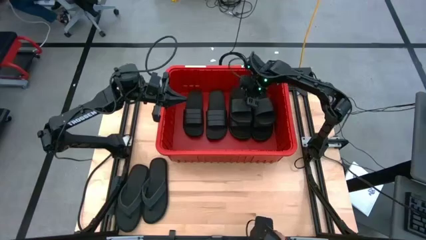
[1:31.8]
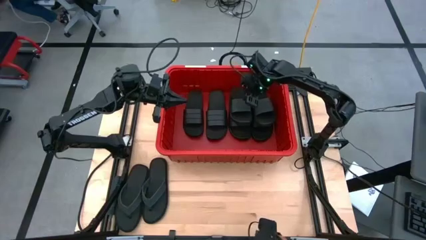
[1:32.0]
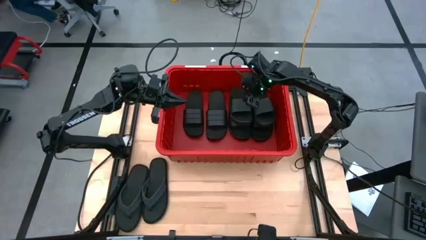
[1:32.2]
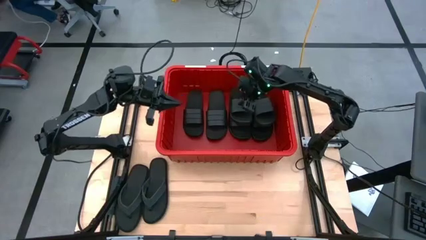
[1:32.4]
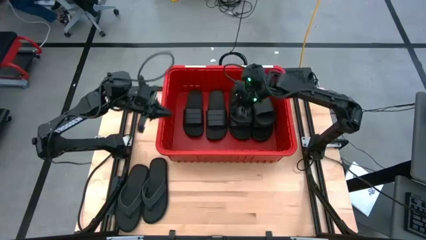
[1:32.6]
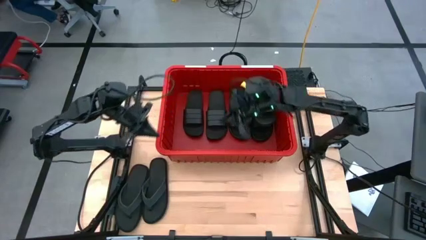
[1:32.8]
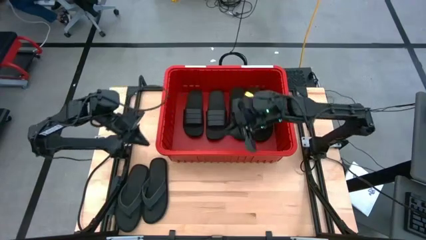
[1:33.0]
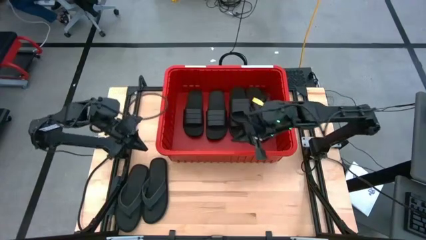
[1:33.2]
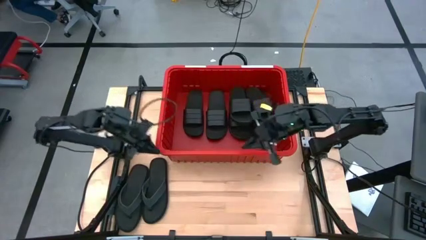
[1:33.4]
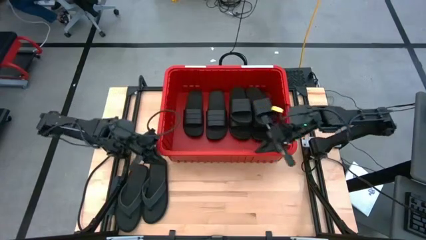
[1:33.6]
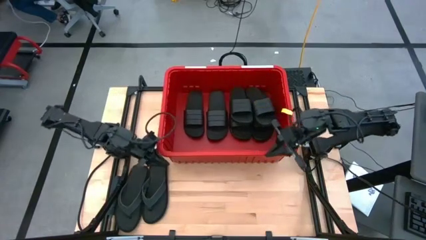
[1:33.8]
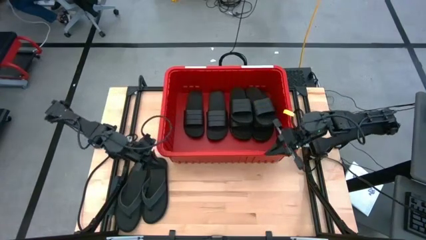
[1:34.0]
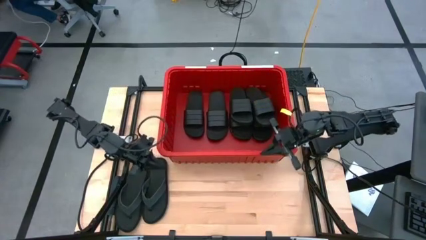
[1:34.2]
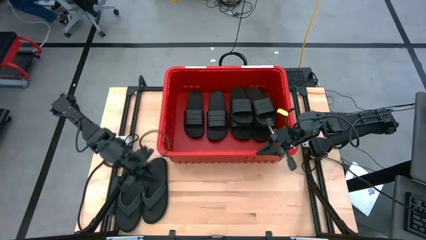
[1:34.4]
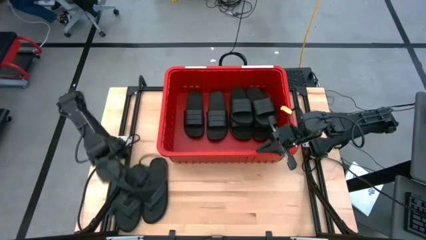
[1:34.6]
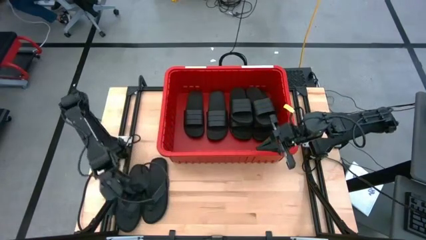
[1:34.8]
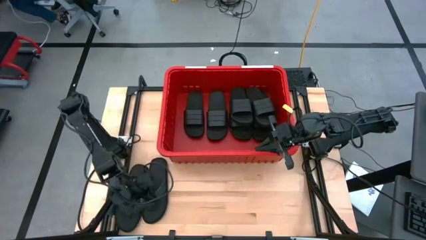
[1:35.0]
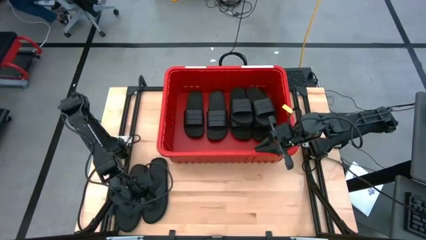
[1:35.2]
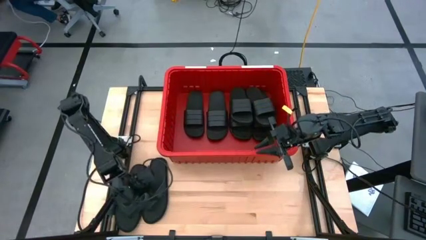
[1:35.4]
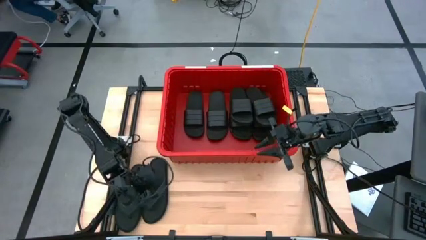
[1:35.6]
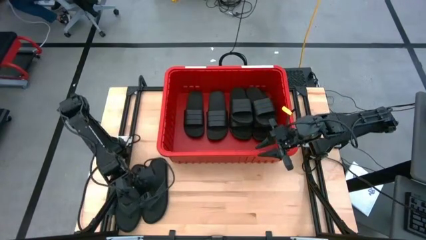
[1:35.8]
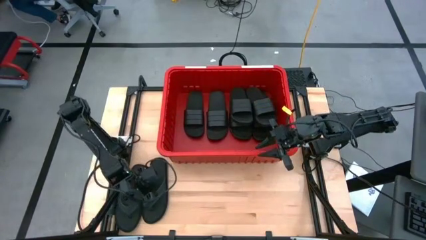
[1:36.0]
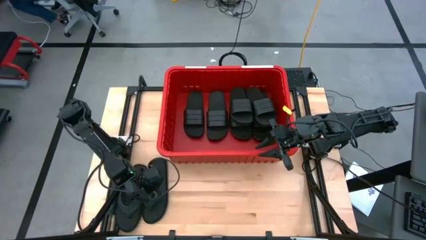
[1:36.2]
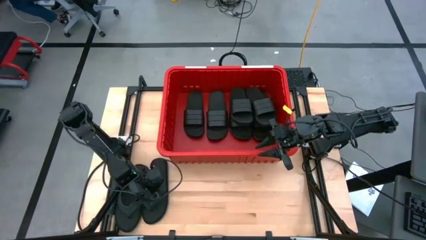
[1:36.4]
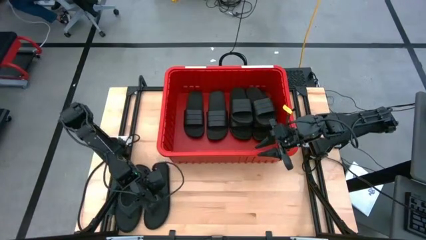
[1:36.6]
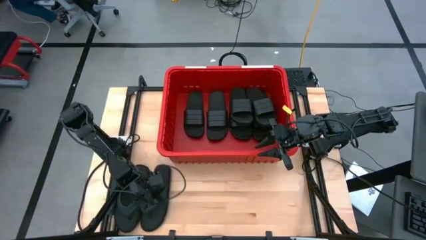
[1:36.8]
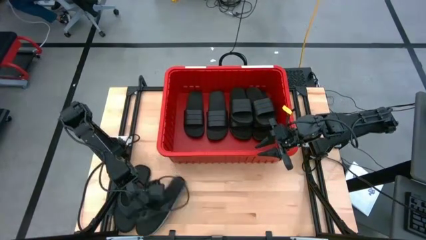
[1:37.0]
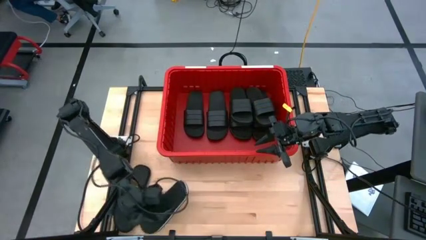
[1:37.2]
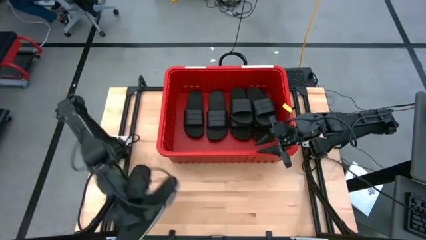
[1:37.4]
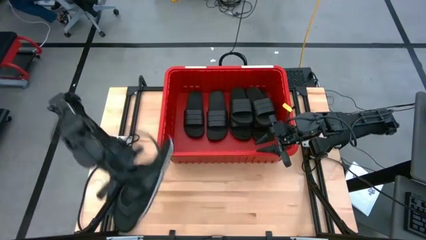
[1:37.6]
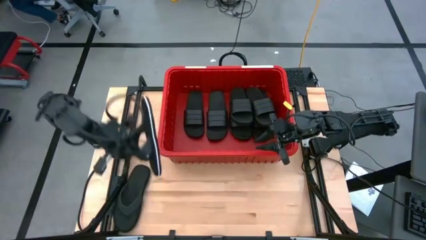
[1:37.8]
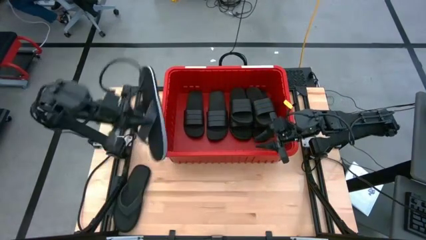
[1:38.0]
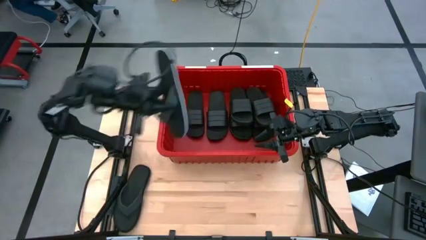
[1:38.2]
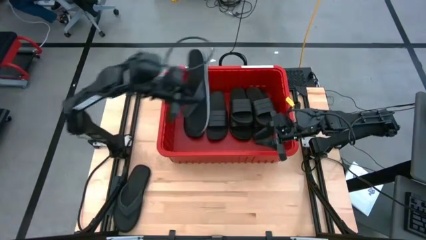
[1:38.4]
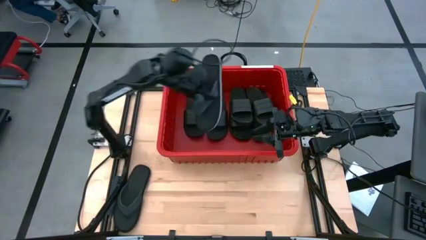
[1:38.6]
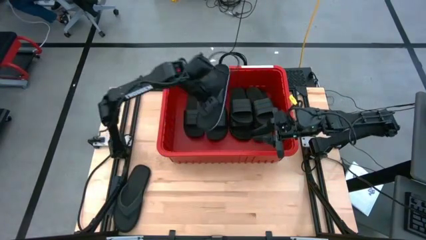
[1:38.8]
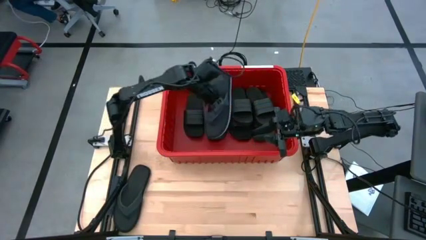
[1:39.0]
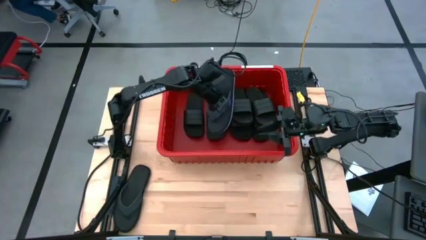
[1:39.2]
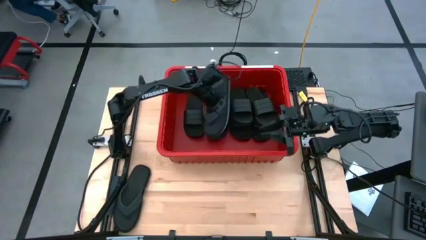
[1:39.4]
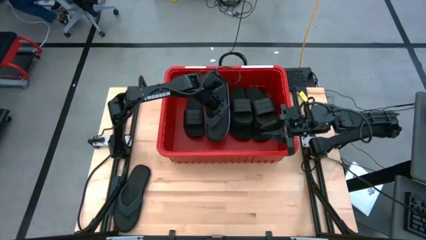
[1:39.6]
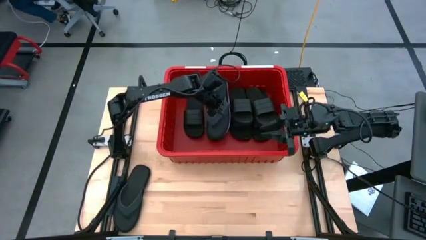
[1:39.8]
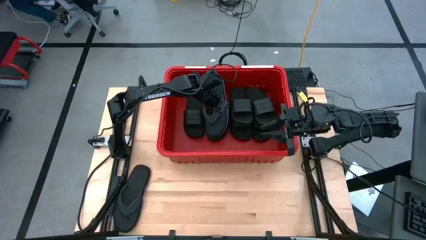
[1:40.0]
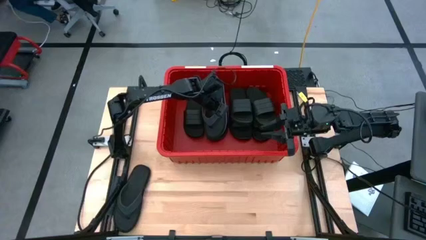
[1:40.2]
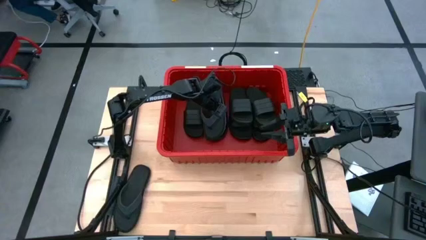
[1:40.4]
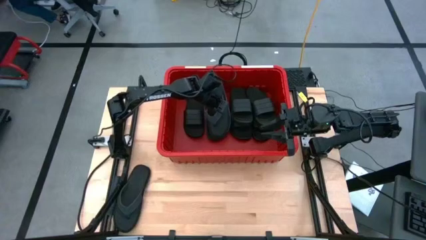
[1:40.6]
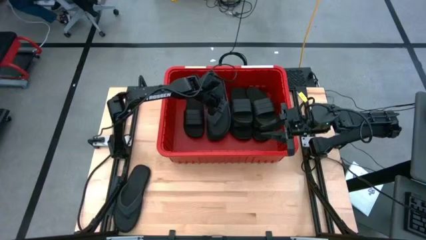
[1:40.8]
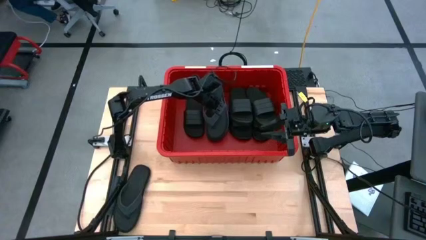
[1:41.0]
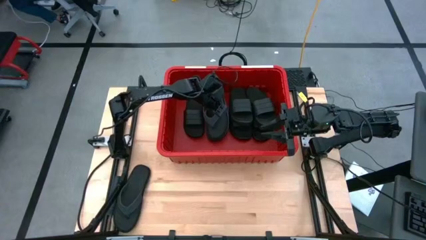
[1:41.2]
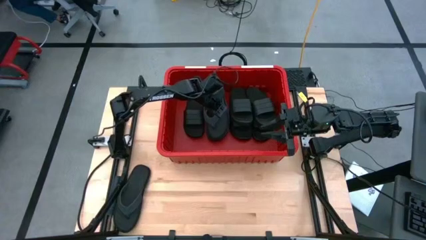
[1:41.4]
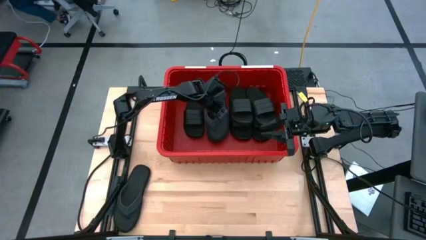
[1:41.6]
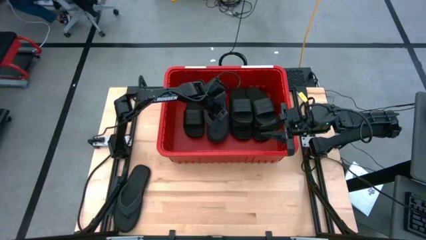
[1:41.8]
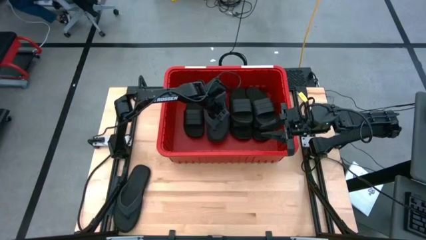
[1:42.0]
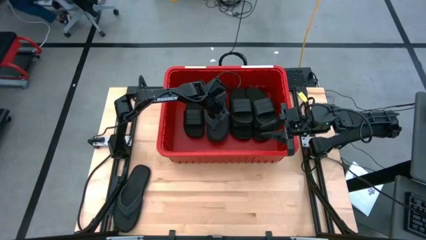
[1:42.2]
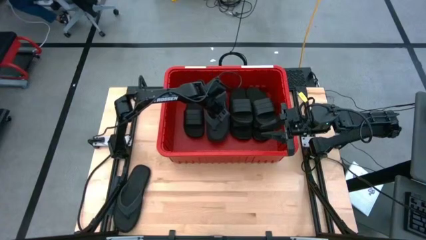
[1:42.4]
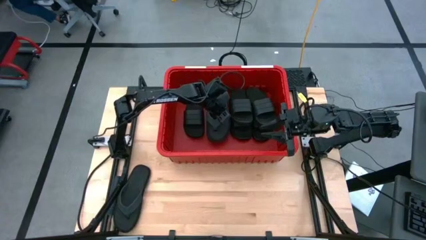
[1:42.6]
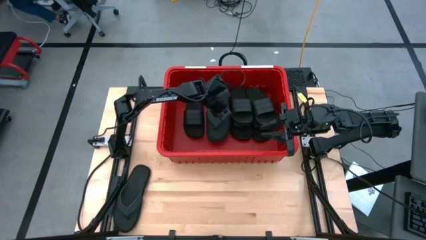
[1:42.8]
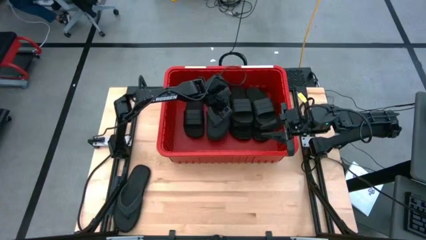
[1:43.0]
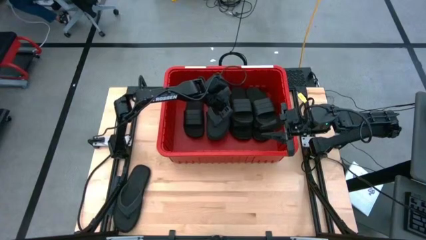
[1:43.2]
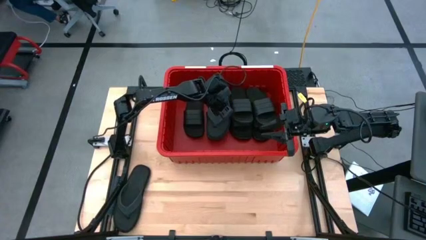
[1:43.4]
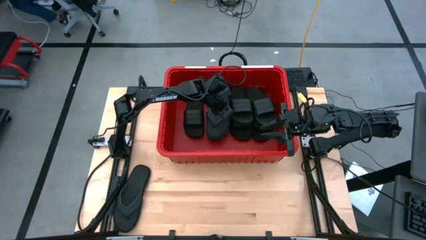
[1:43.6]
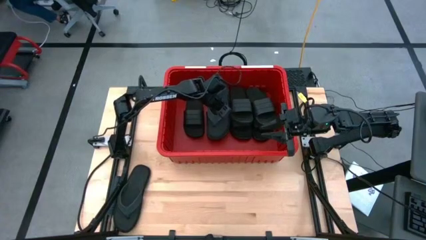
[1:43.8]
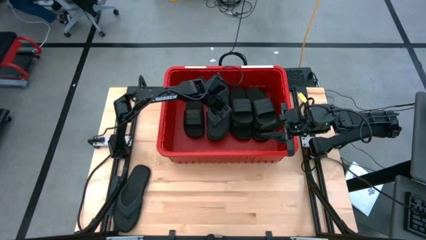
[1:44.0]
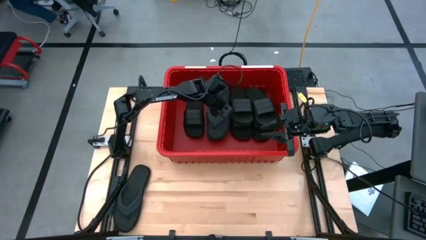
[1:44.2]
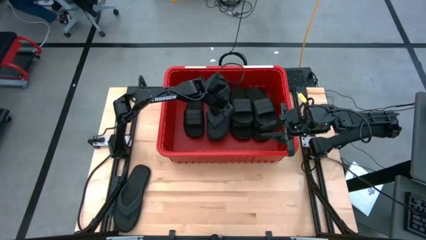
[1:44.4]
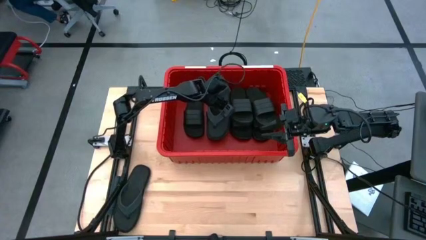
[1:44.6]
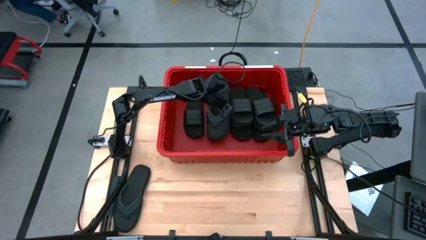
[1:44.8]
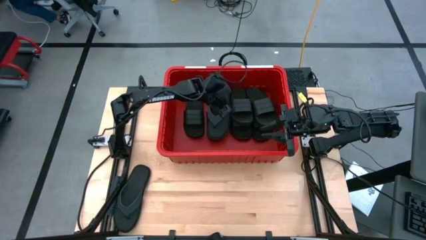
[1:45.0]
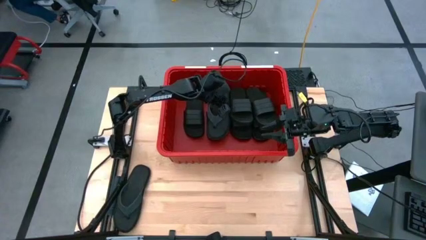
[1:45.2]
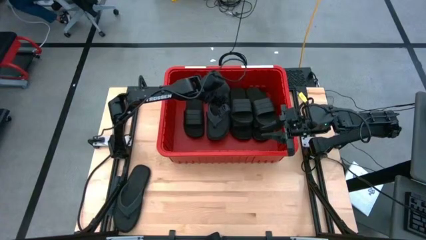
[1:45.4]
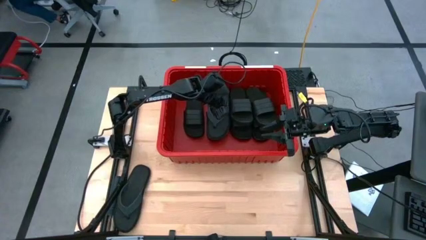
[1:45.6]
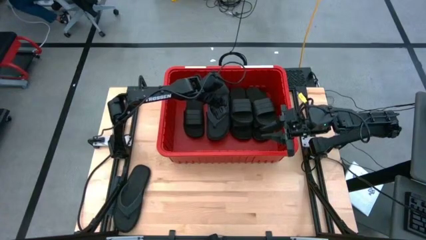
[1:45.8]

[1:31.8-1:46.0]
Task: Pick and place slides into bin
Stack the black slipper in the red bin
